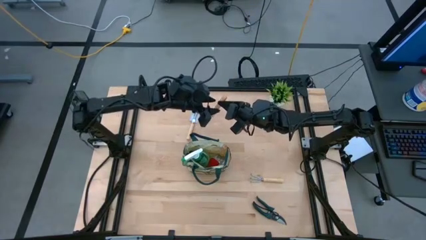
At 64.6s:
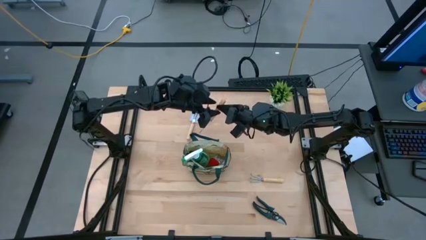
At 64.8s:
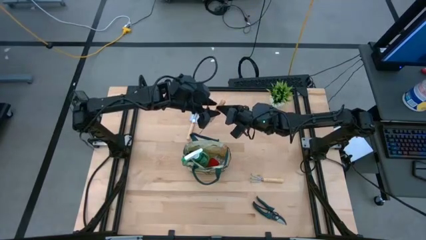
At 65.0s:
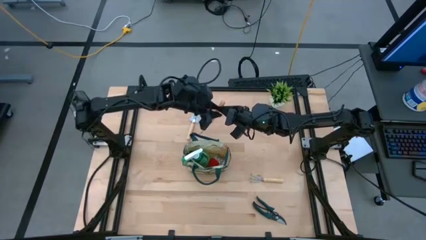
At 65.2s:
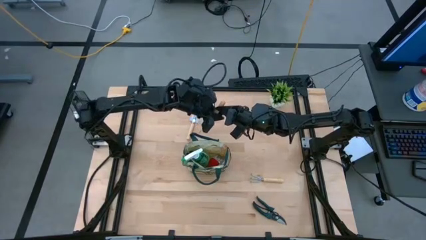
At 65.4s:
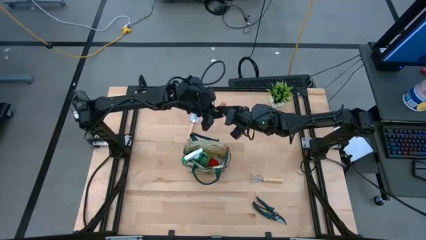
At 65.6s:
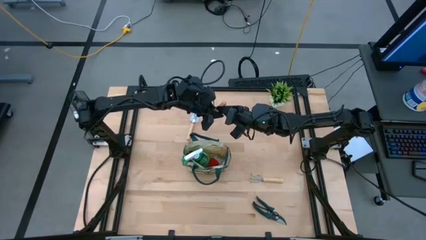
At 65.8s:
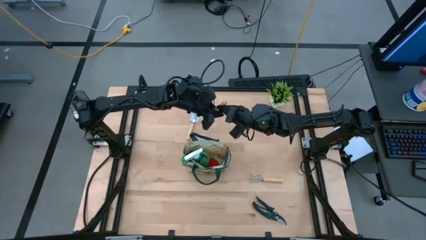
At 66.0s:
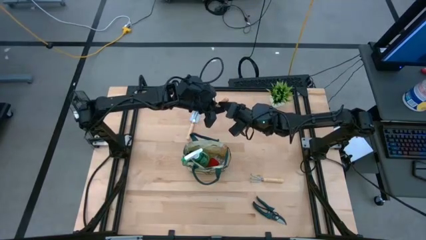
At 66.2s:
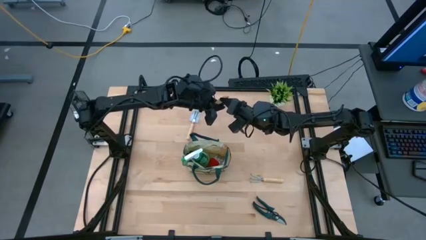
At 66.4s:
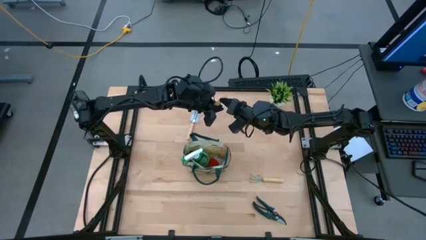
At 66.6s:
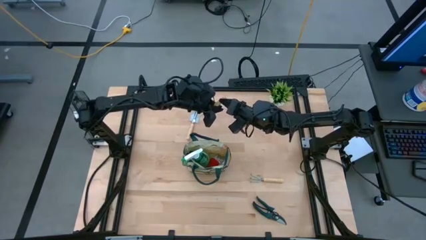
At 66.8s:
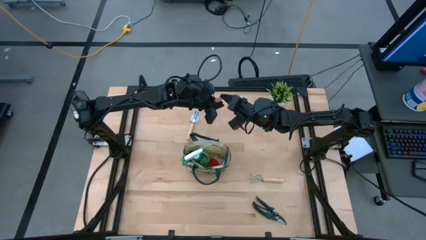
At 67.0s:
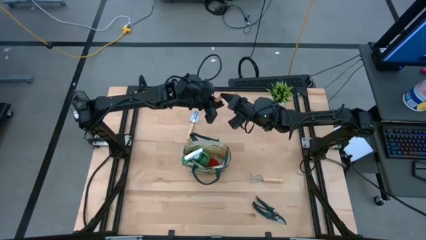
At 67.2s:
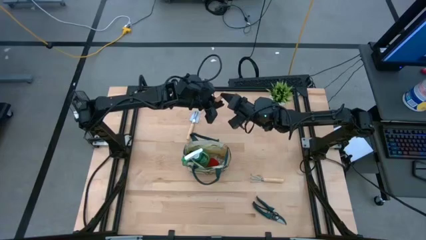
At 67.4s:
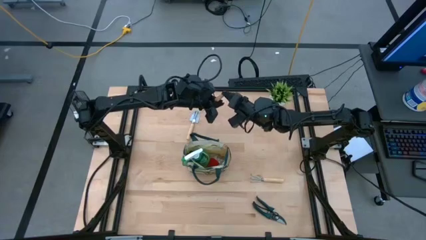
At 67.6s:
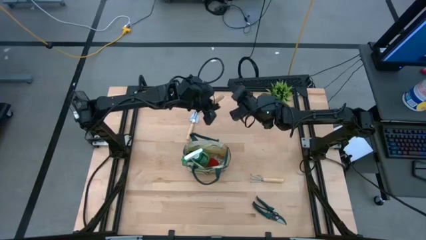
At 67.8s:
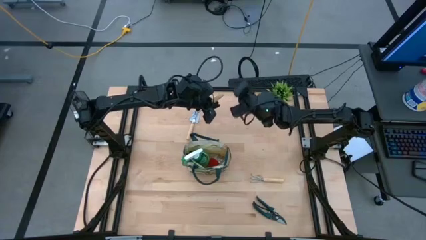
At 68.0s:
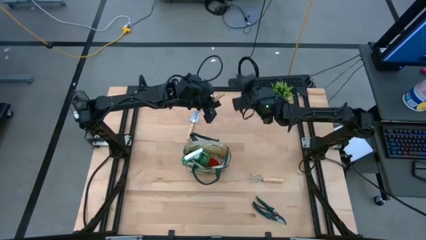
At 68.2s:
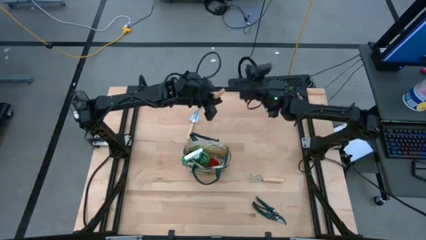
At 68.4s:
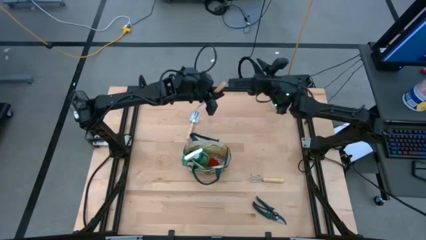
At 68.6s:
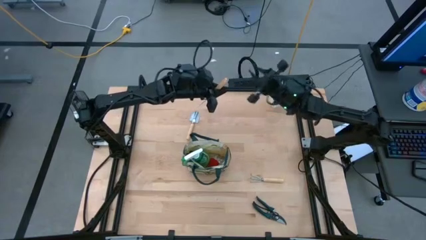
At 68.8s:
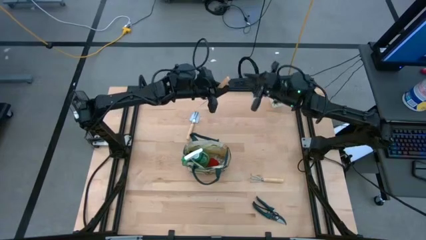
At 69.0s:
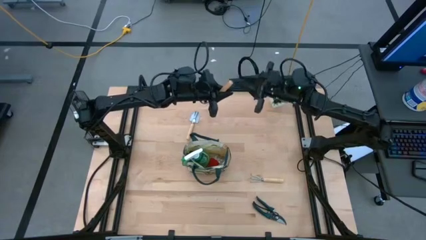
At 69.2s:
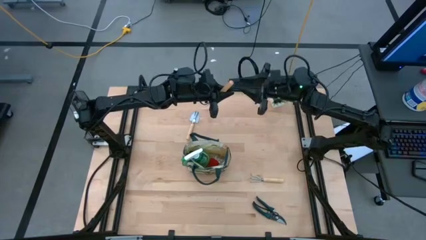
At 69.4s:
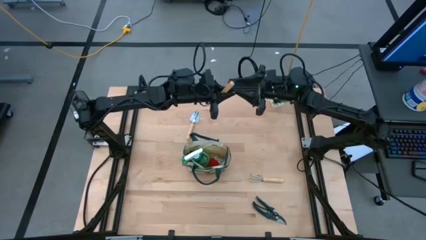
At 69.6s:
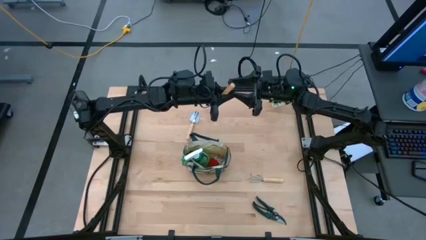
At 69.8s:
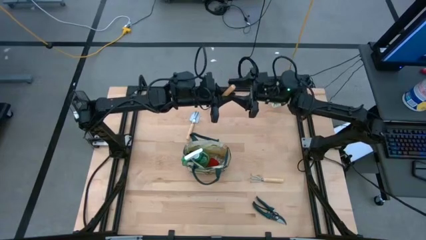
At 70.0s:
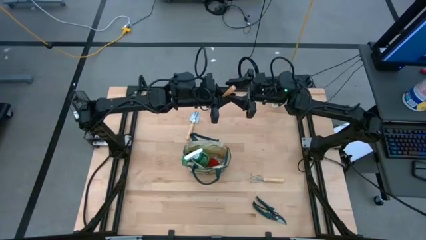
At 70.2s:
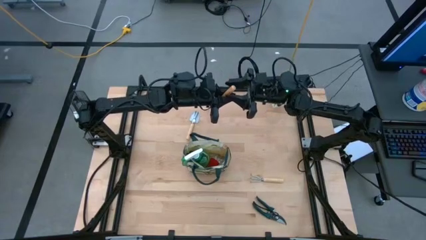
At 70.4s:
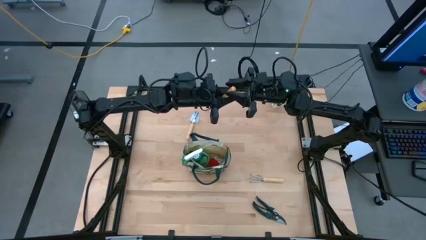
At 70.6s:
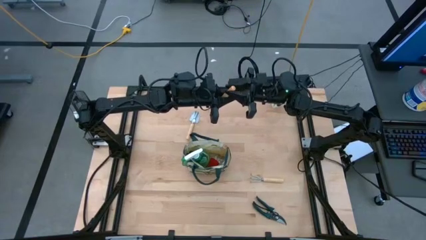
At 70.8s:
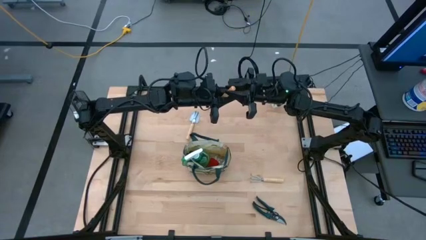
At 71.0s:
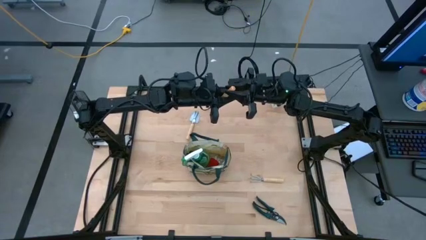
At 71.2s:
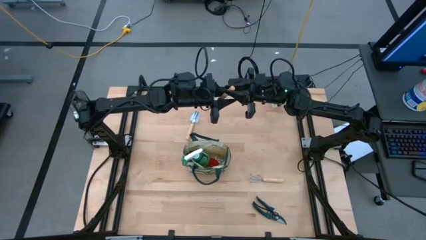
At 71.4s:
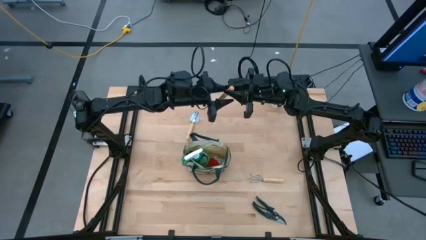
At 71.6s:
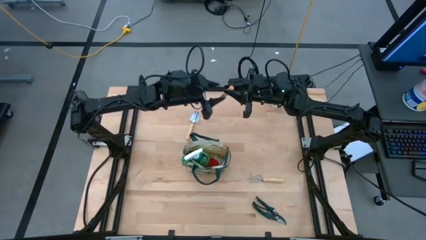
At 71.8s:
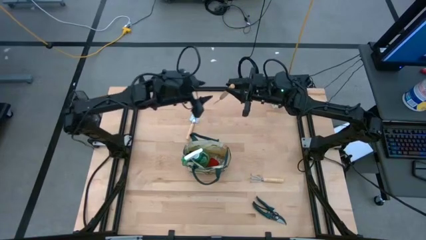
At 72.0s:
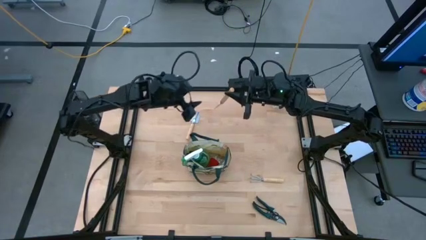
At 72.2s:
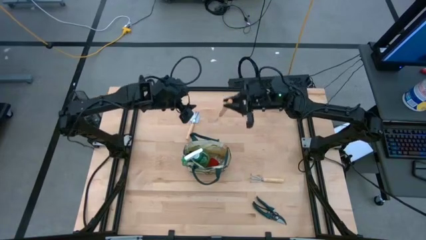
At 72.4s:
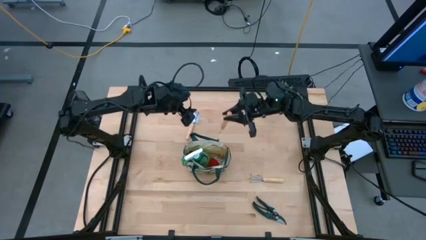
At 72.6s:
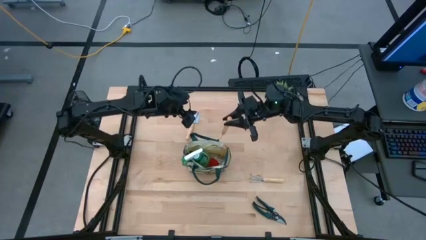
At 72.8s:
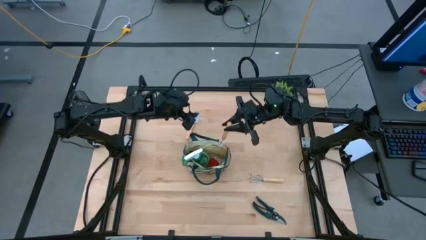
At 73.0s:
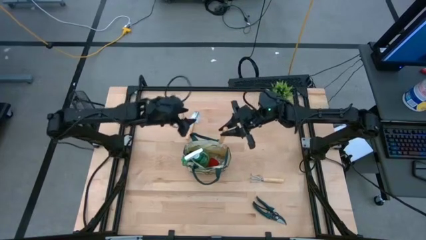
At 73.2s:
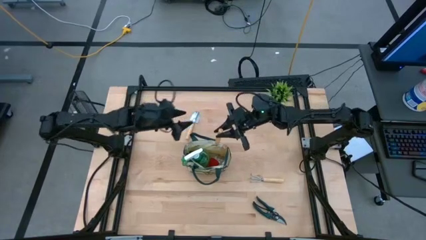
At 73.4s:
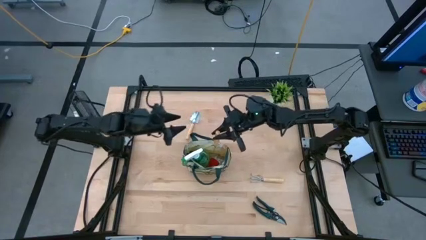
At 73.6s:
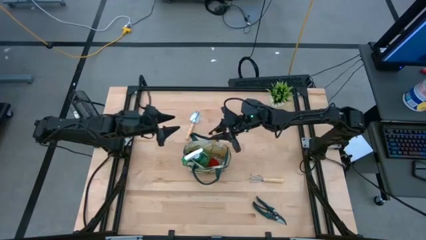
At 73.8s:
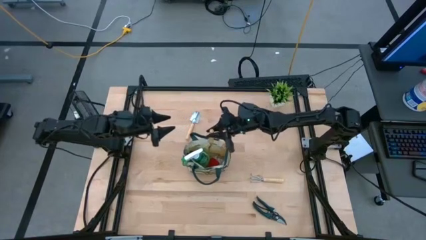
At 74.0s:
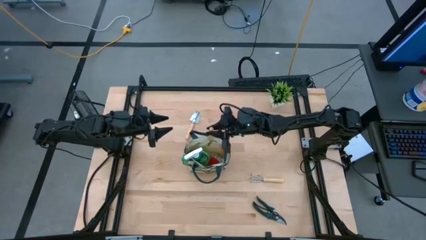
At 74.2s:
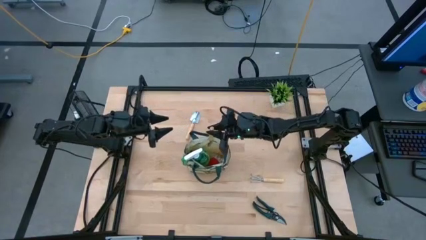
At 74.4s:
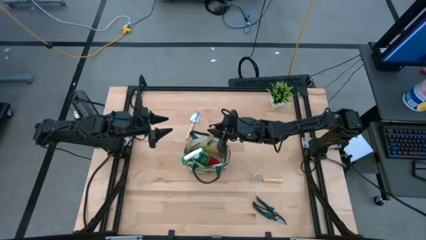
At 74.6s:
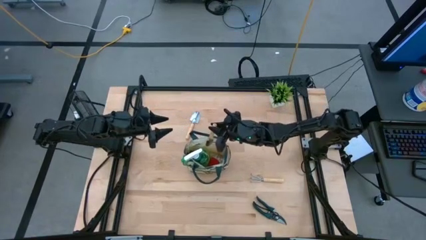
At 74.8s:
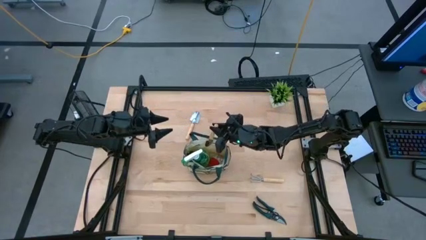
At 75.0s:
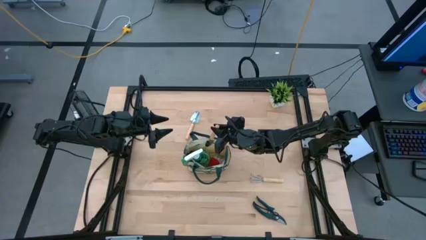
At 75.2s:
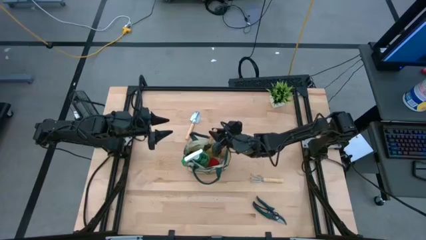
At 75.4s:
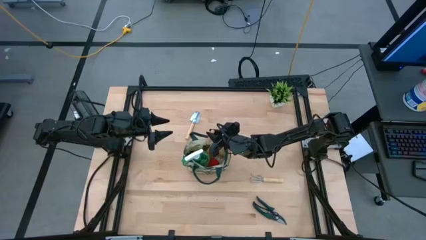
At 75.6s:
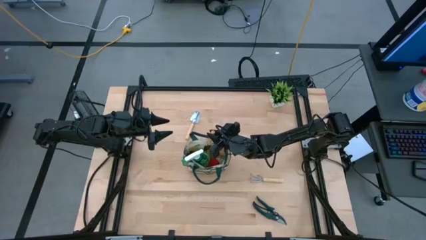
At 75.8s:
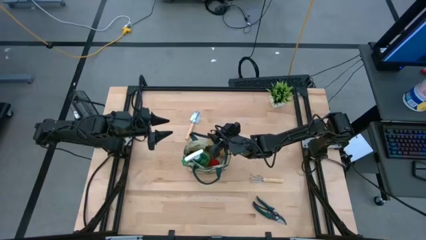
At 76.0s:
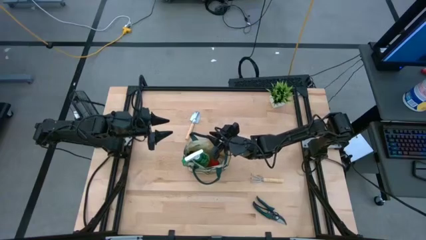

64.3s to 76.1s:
Task: Pick & Place Garden tools in Gardening bag
Put the right brown trowel into the white gardening bag

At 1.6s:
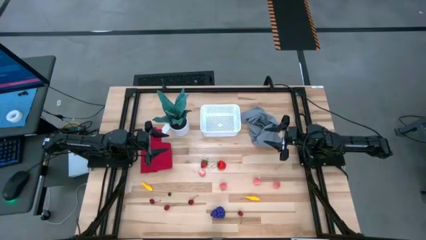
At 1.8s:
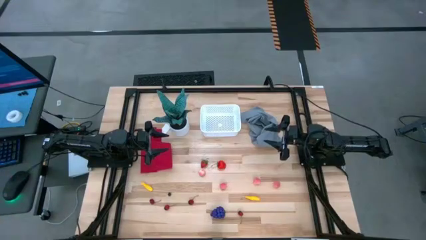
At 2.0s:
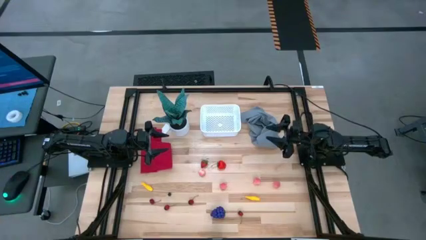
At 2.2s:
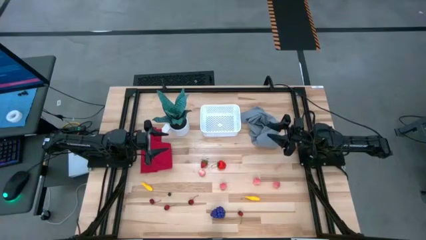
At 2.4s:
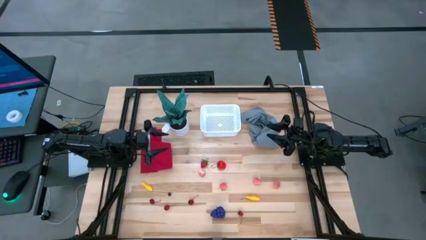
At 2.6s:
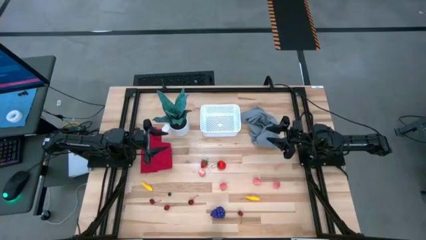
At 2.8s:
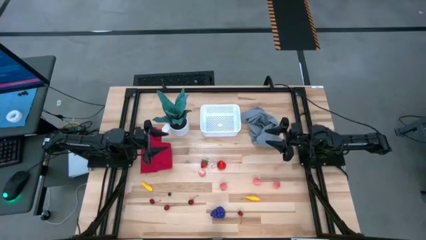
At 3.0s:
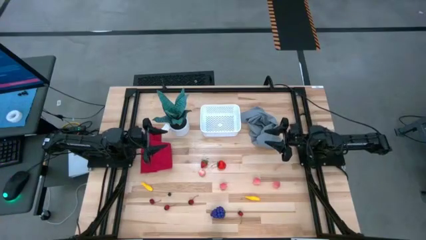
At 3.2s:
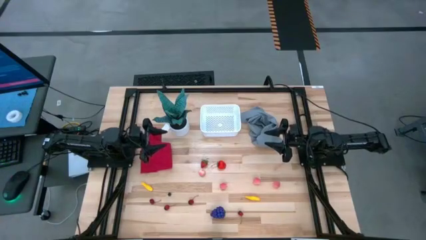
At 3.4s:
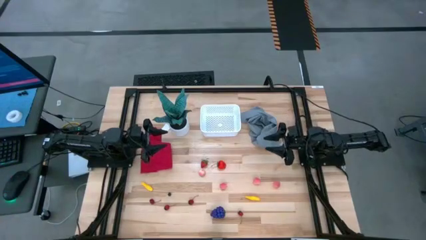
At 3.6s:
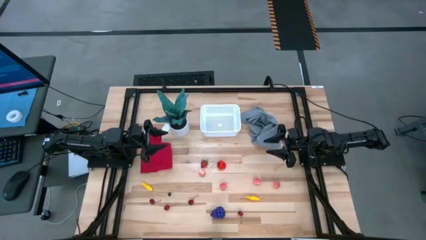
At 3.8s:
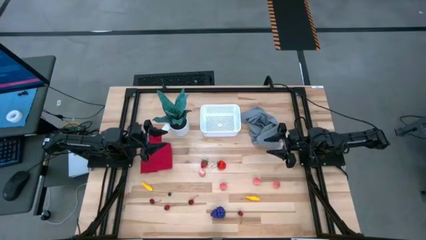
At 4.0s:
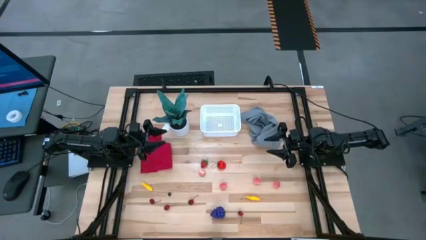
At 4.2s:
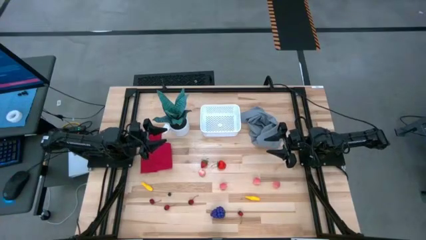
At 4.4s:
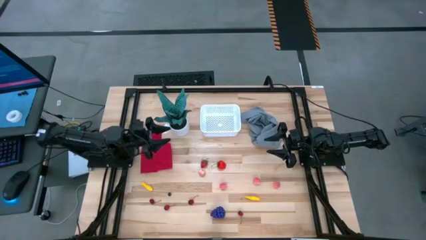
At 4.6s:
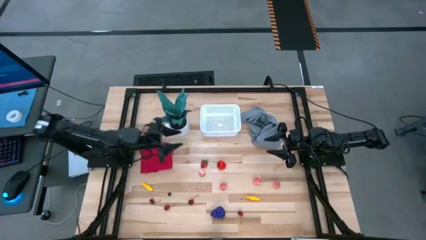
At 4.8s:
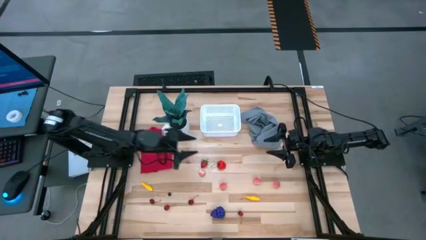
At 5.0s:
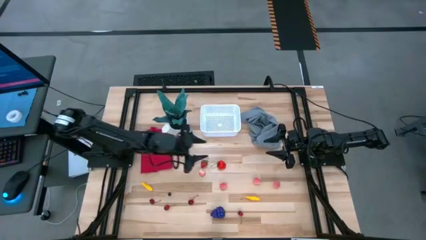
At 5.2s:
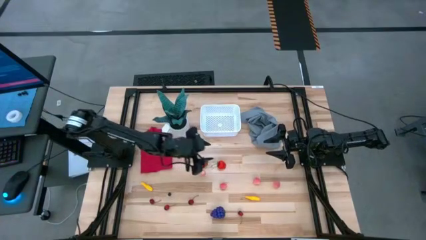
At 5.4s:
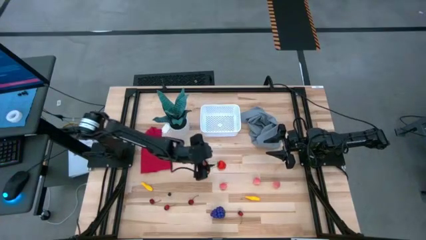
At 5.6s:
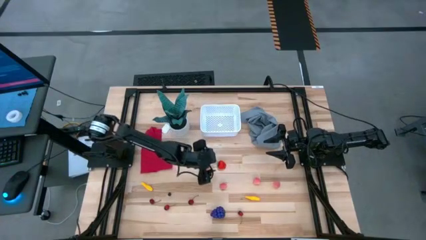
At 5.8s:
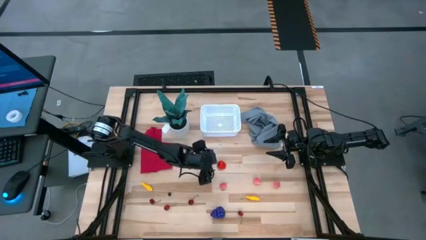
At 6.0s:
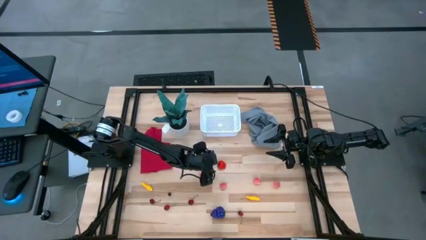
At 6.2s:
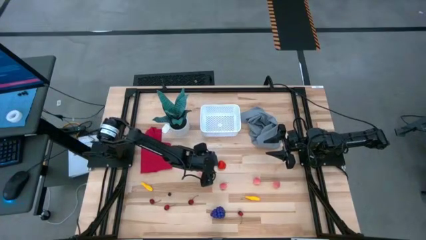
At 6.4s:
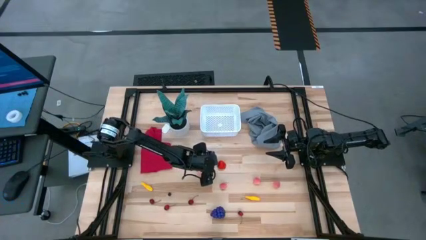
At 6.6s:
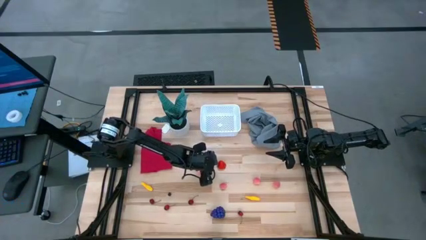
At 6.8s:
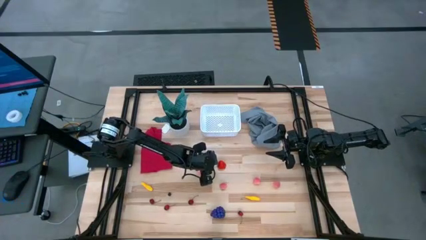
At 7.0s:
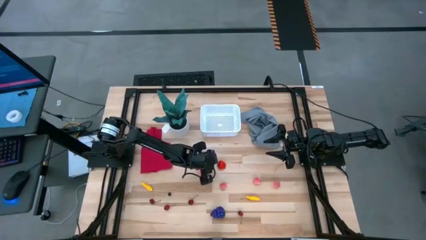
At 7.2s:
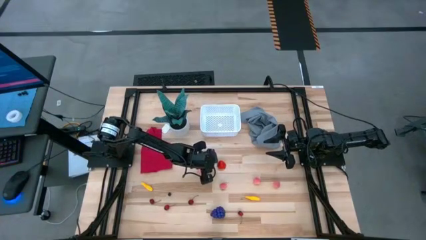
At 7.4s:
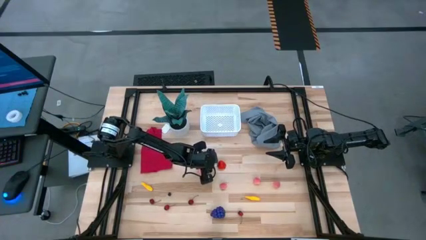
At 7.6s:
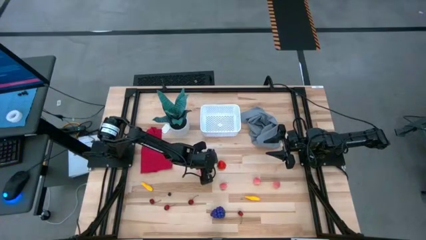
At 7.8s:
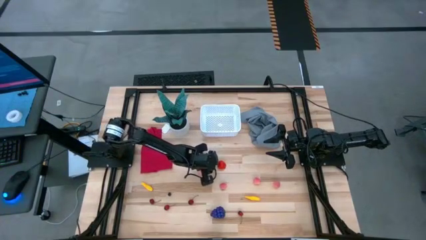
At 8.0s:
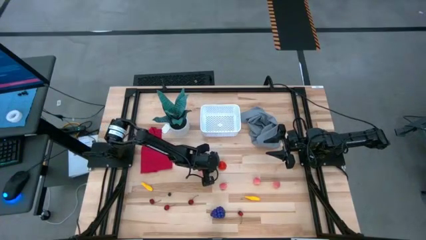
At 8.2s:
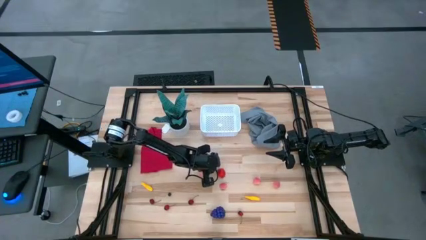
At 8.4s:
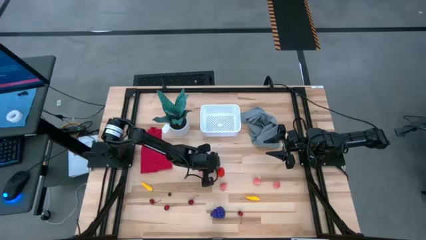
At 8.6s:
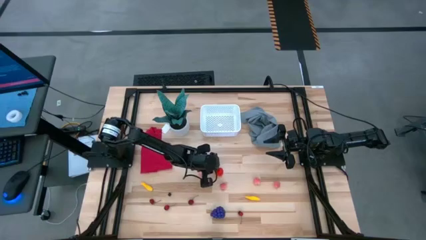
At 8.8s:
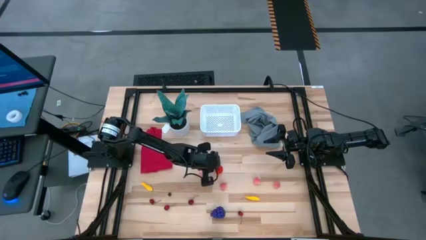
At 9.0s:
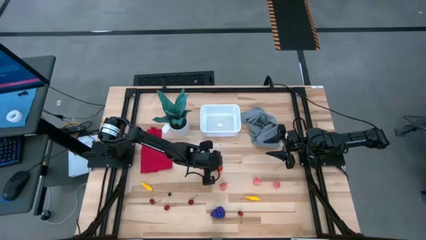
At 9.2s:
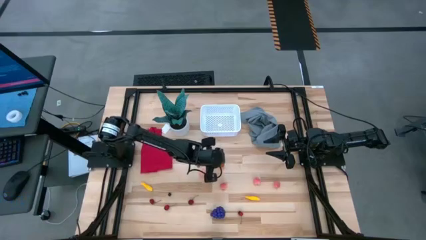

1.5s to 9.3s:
Task: Pick and placing Produce into tupperware
Put the red strawberry into the white bin
